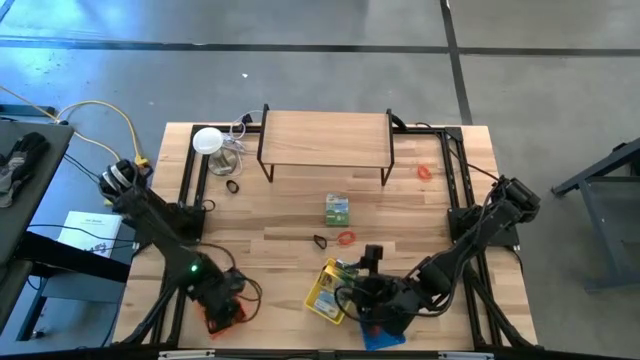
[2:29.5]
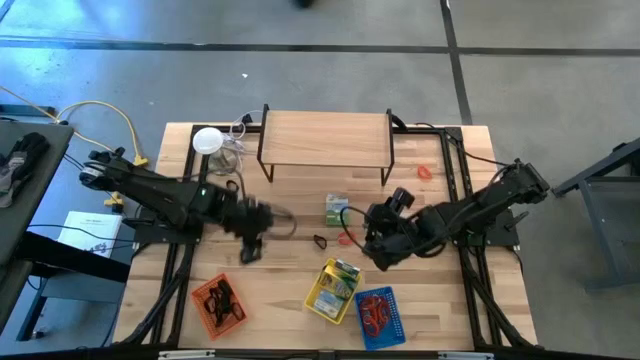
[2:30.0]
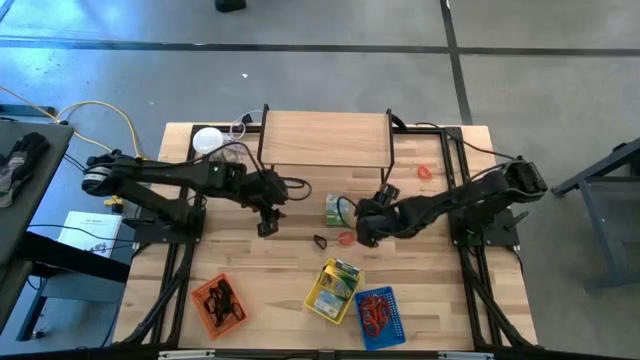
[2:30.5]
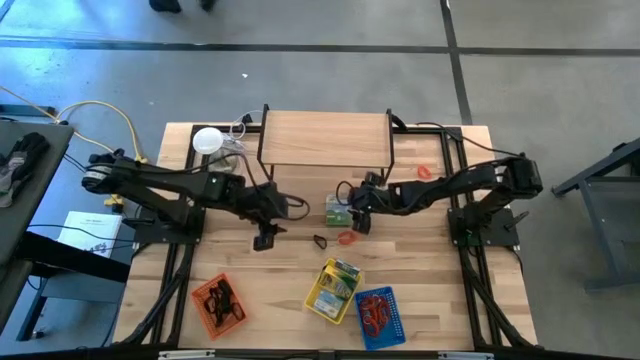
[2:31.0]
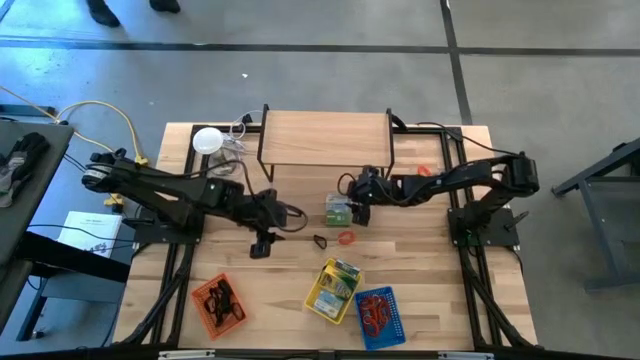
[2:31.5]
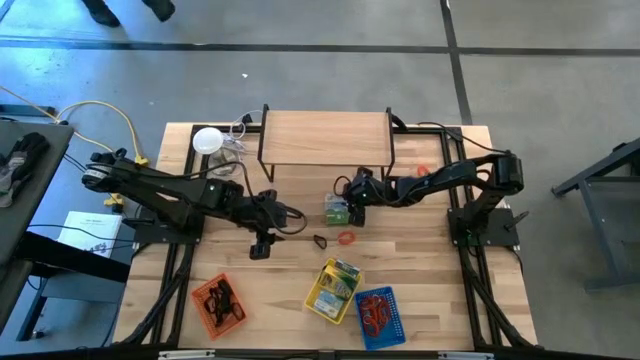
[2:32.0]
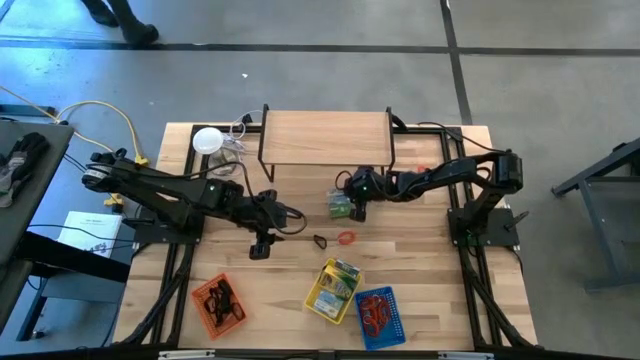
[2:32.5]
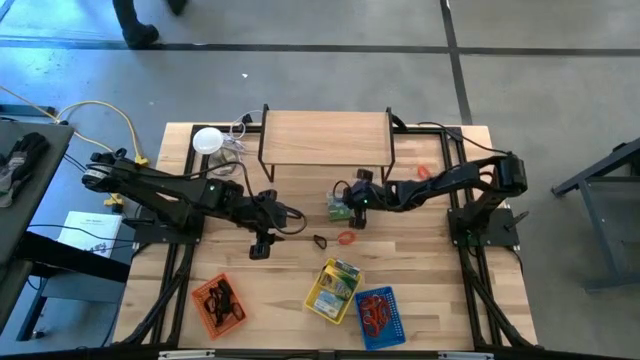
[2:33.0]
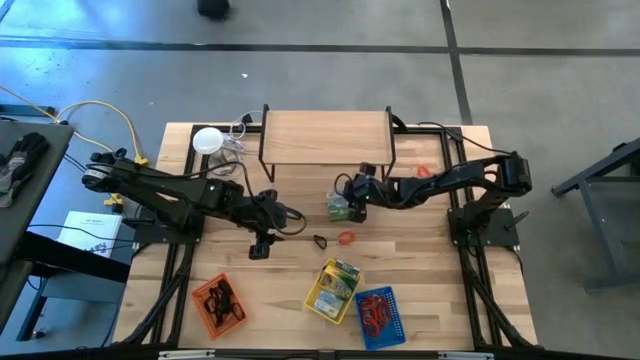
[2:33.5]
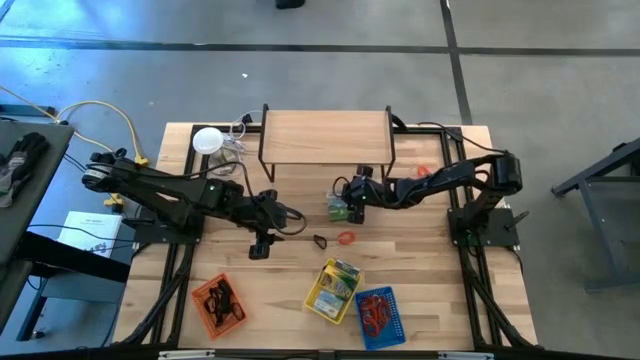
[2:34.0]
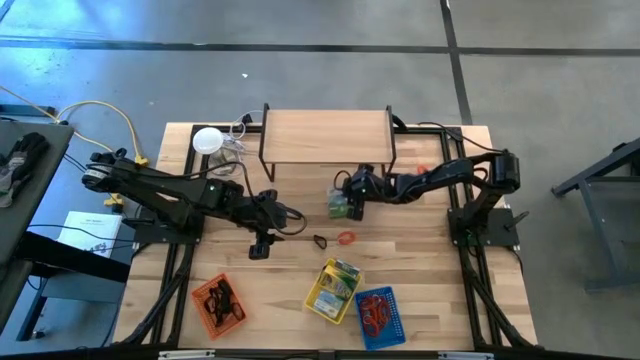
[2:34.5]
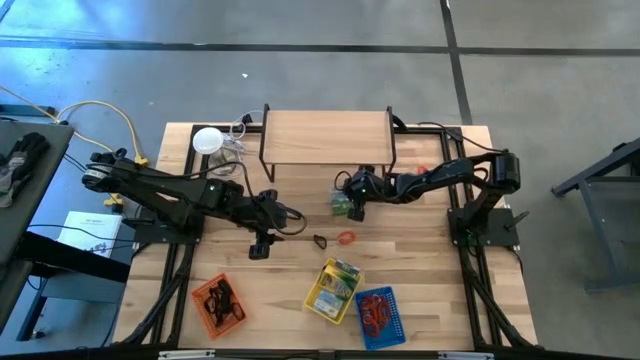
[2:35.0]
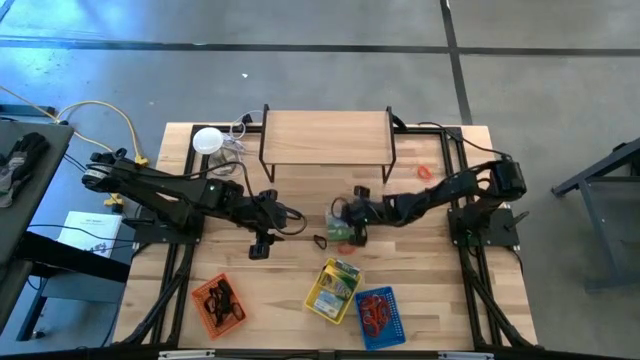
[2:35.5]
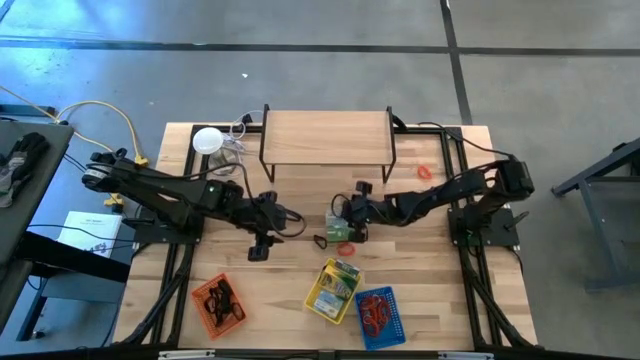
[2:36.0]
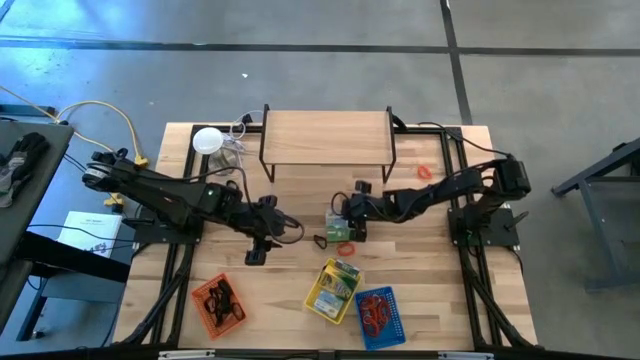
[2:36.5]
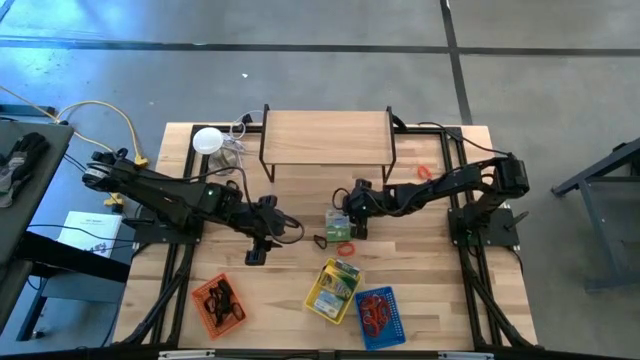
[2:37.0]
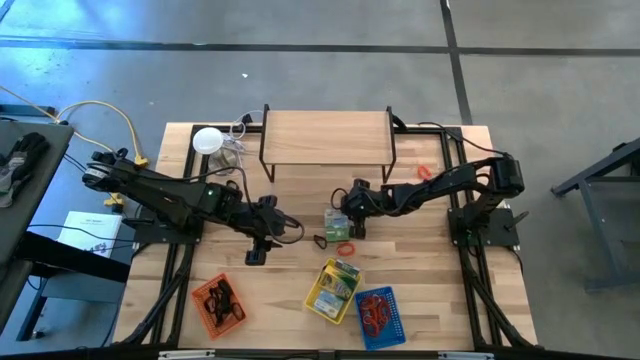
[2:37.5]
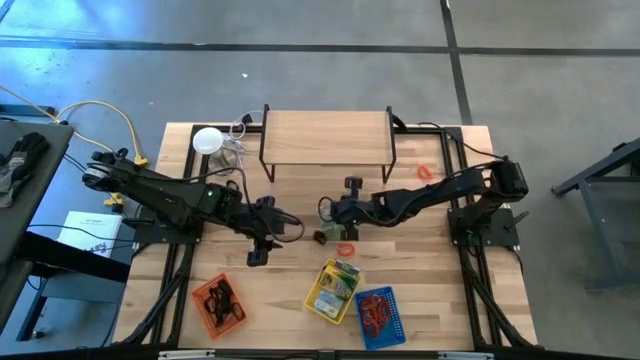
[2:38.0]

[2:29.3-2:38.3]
Task: Pick & Place Office Desk Supplies
Put the yellow crayon box into the yellow box

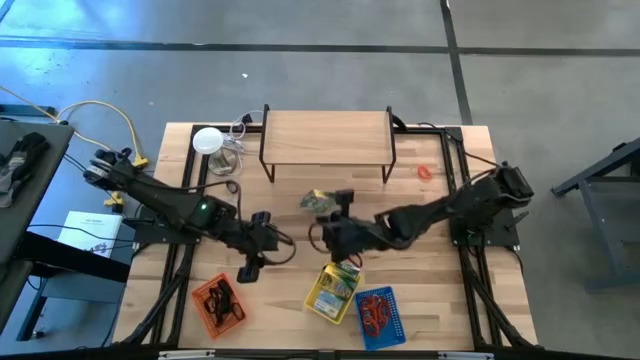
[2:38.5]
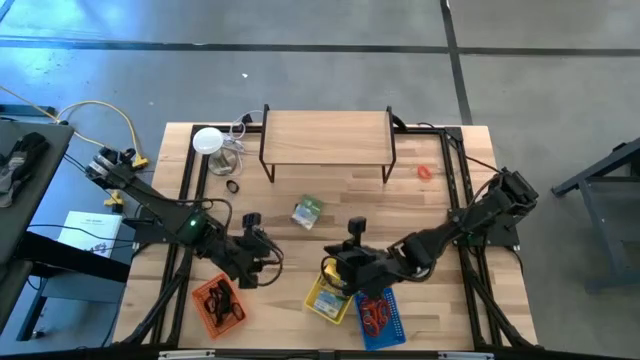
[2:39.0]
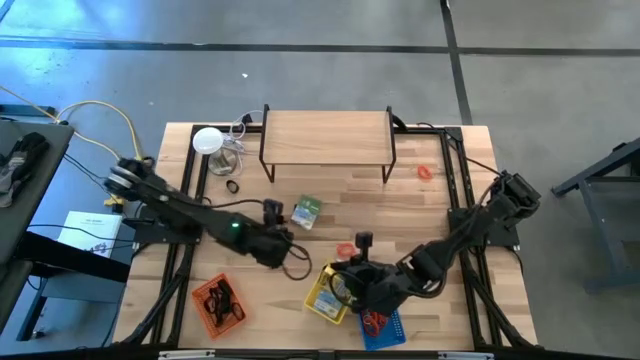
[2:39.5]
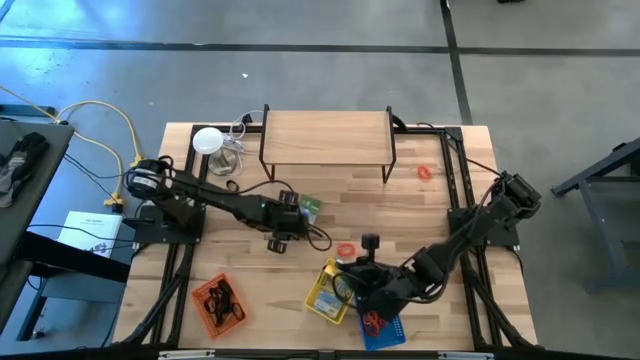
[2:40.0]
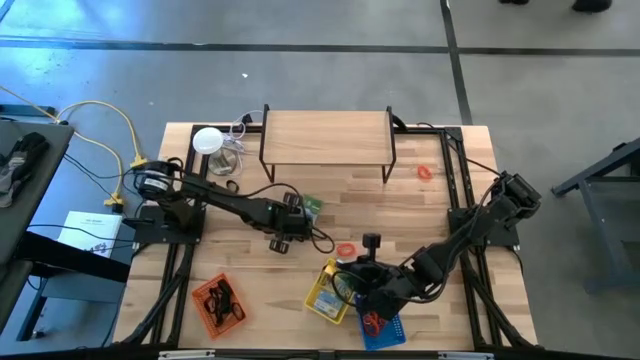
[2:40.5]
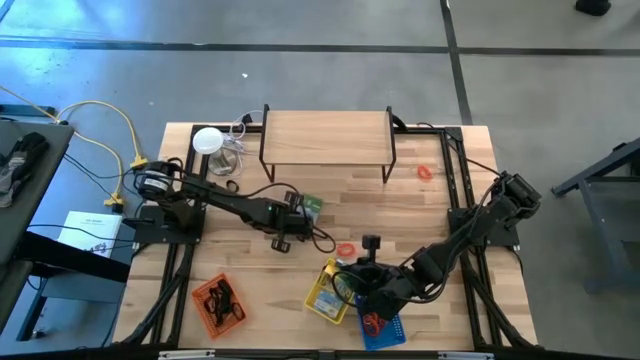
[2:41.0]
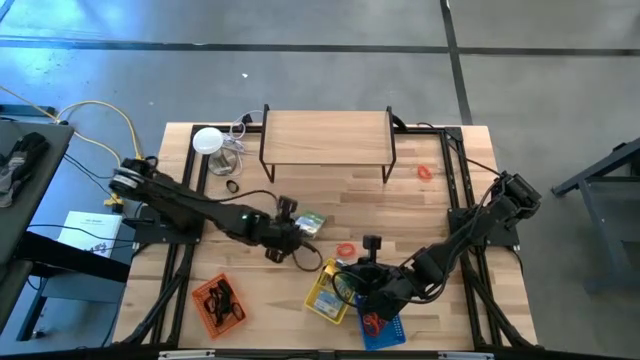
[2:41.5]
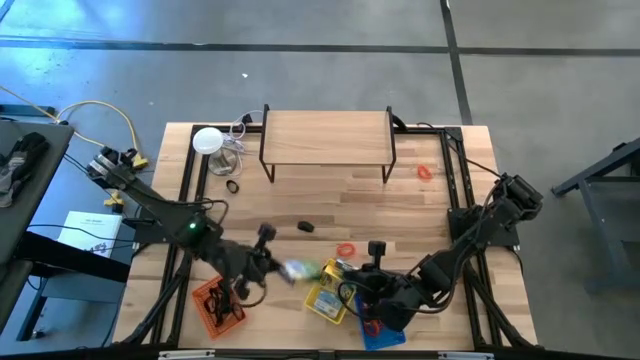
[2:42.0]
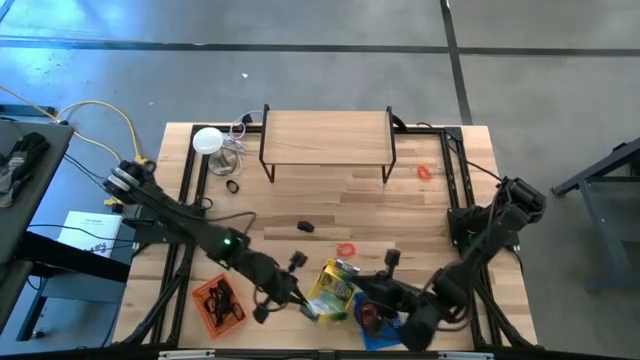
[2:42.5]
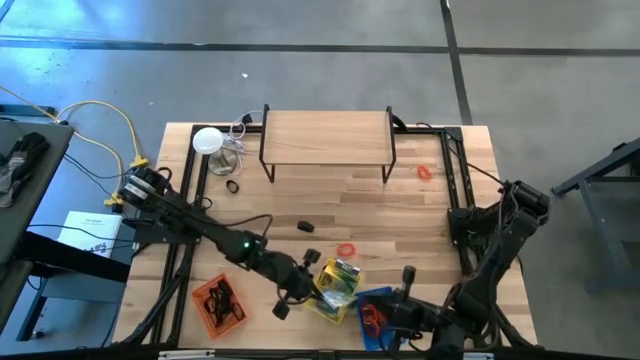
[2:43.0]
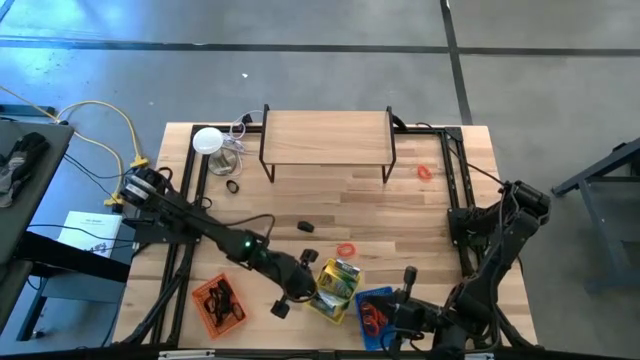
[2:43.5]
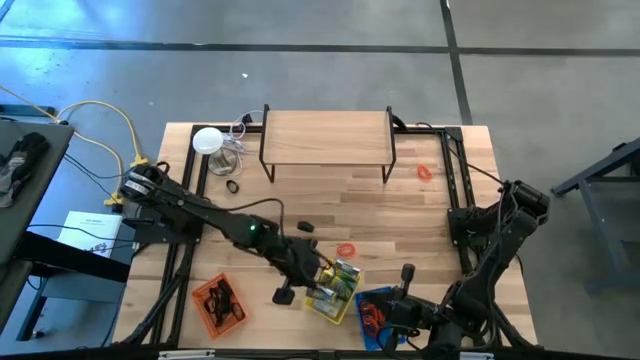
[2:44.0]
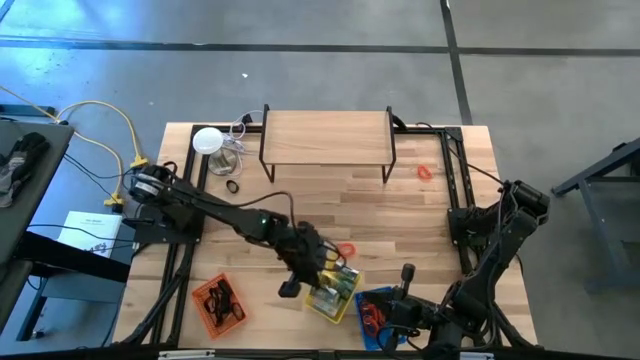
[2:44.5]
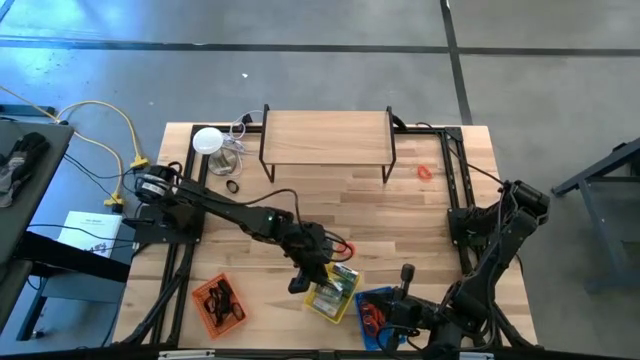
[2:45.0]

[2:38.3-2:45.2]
Put the yellow crayon box into the yellow box

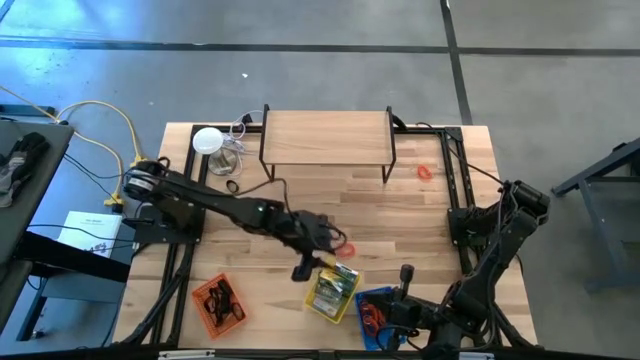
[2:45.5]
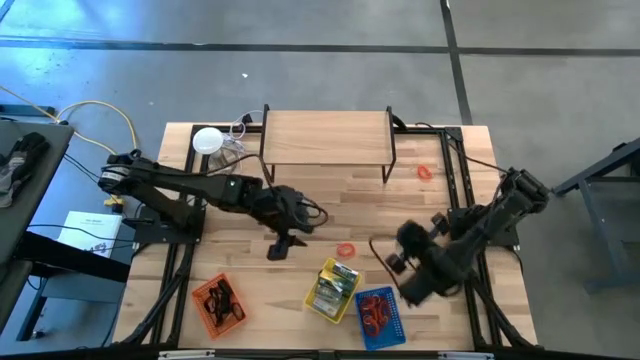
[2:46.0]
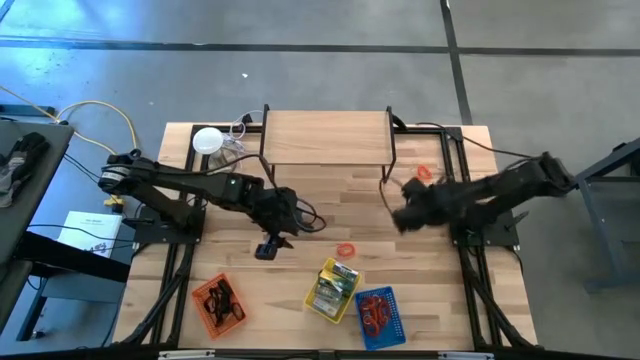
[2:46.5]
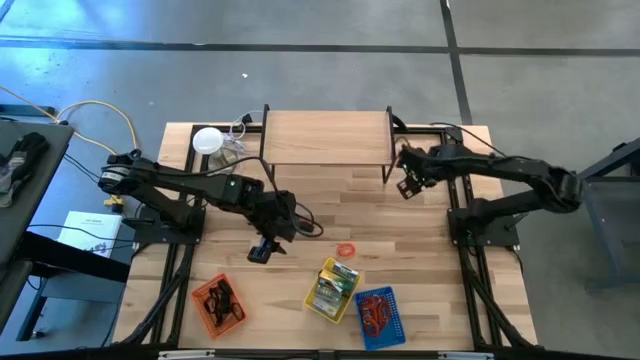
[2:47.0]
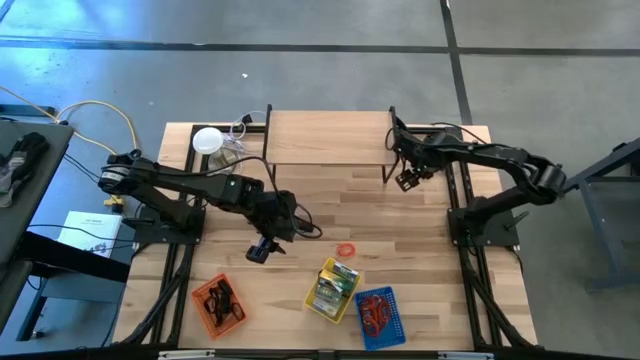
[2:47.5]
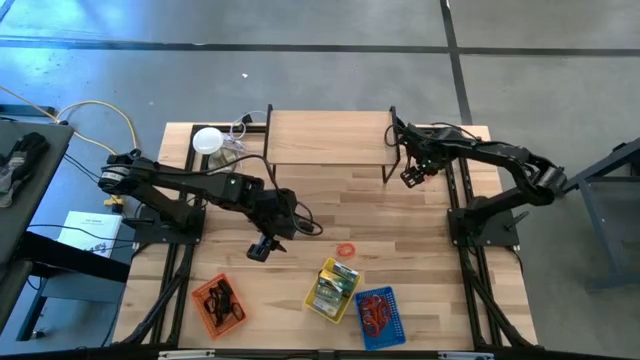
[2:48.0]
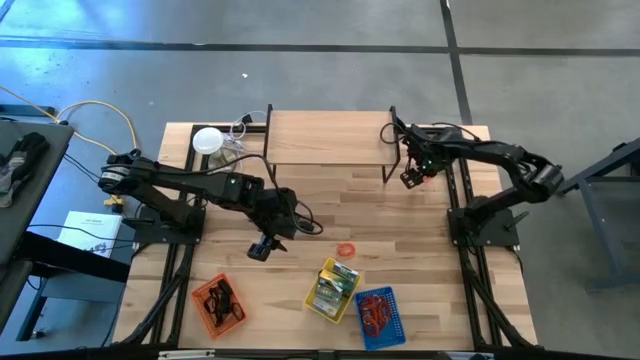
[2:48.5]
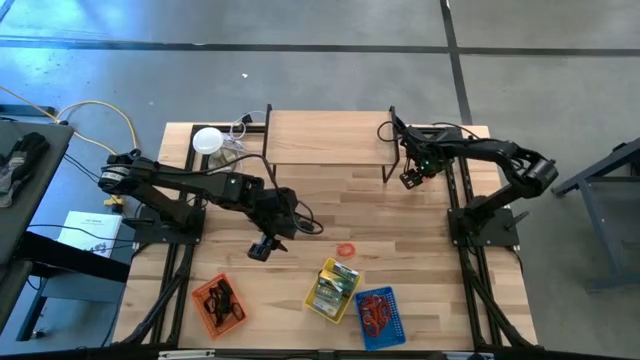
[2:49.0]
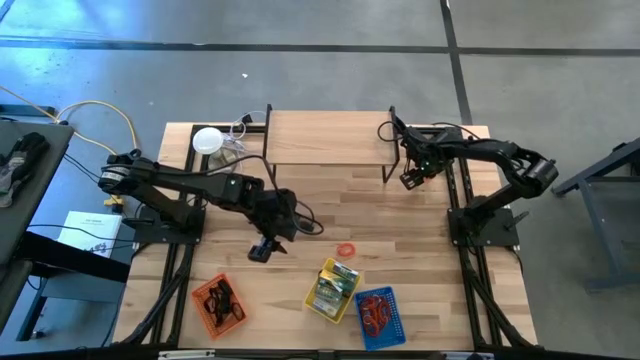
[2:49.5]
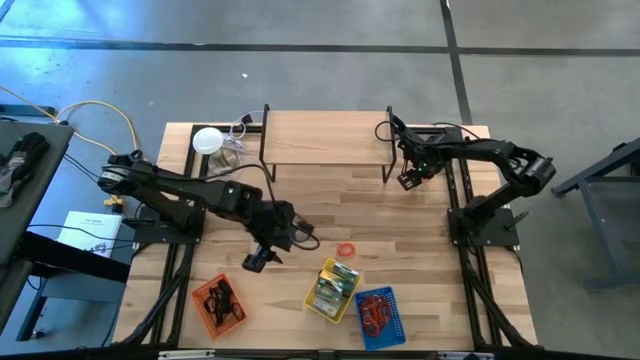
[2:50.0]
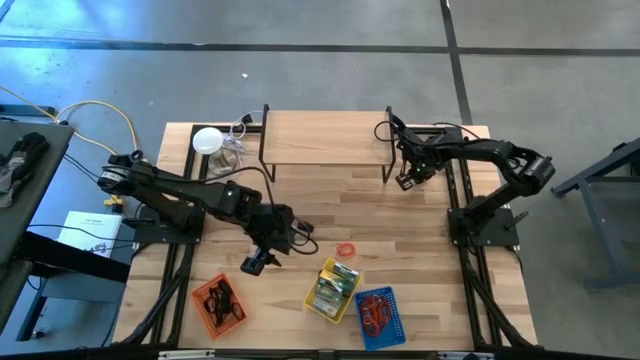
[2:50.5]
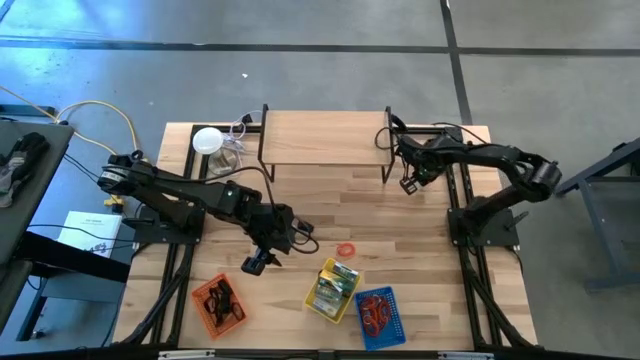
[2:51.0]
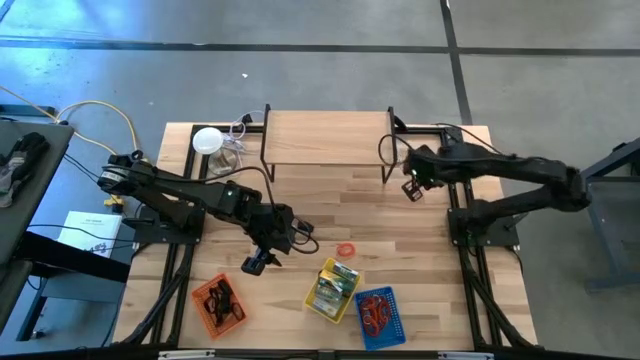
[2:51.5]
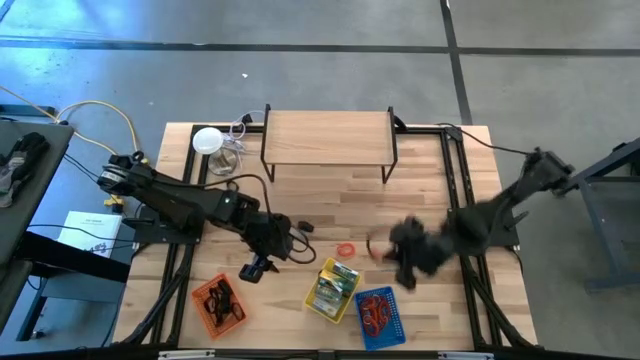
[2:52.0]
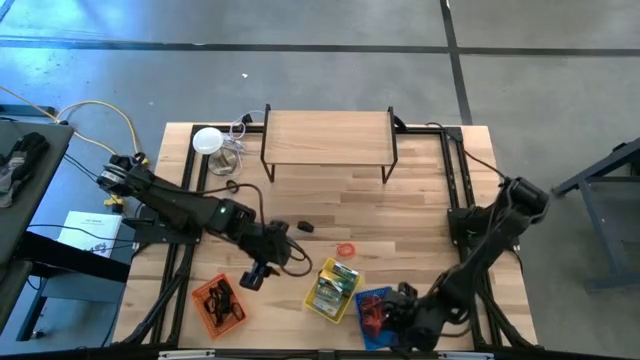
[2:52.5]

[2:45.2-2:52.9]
Put the top orange spring keychain into the blue bin
